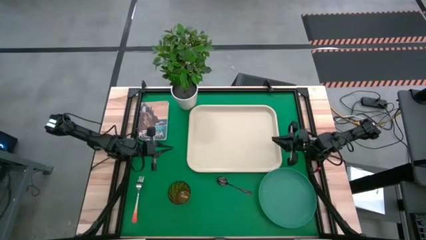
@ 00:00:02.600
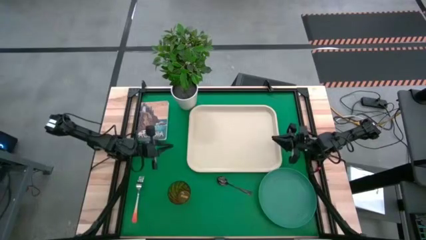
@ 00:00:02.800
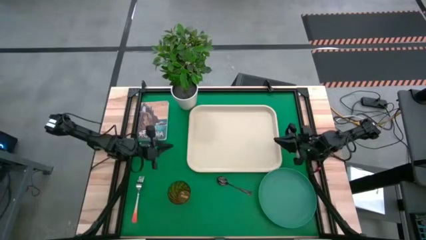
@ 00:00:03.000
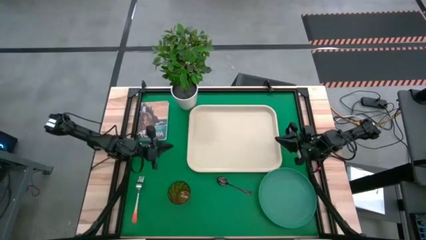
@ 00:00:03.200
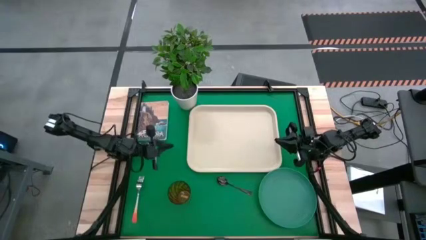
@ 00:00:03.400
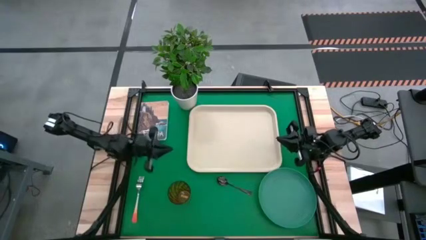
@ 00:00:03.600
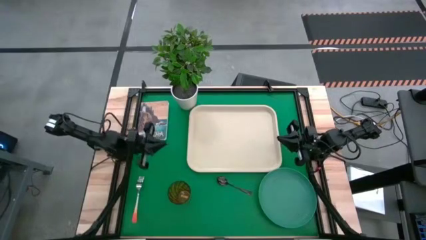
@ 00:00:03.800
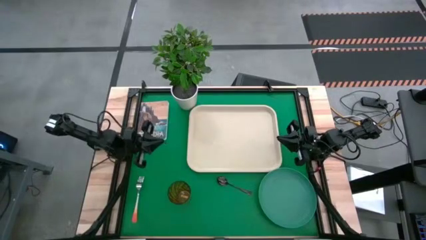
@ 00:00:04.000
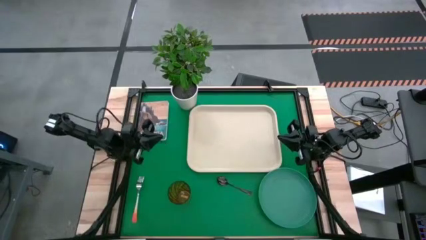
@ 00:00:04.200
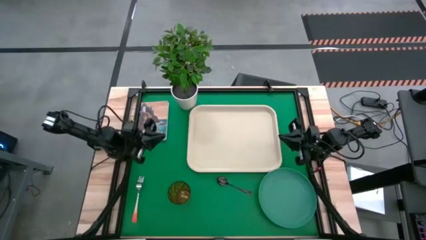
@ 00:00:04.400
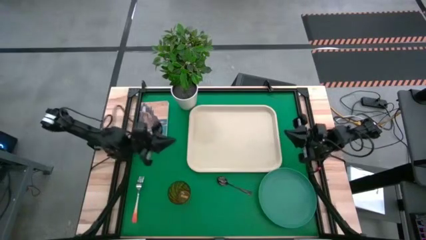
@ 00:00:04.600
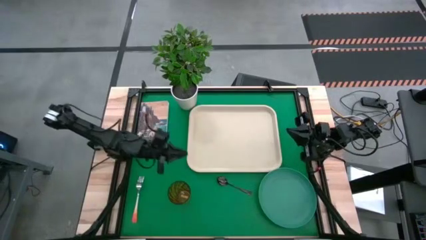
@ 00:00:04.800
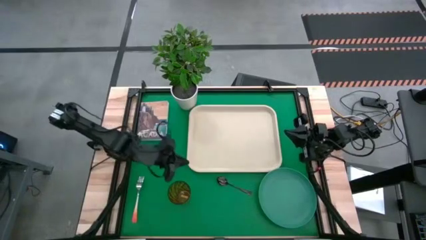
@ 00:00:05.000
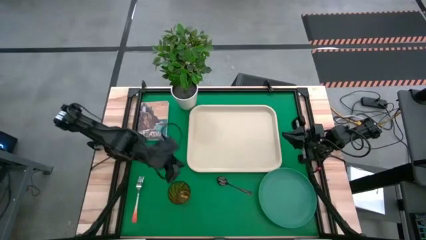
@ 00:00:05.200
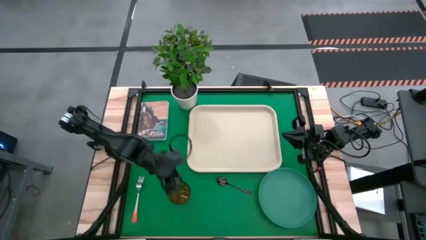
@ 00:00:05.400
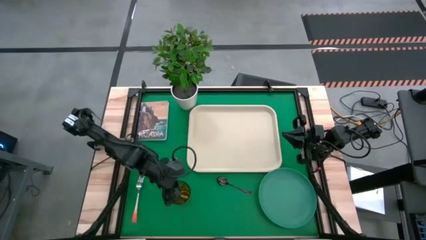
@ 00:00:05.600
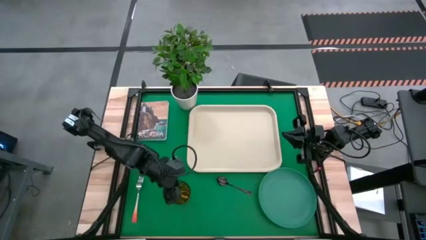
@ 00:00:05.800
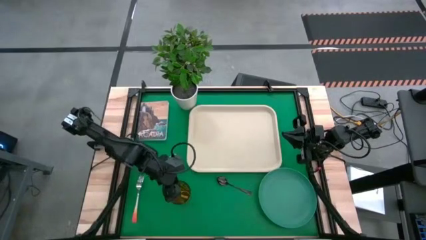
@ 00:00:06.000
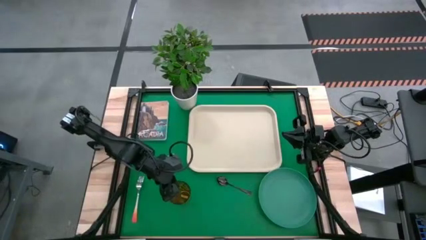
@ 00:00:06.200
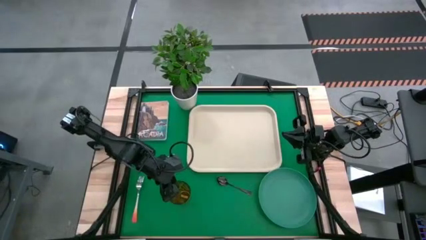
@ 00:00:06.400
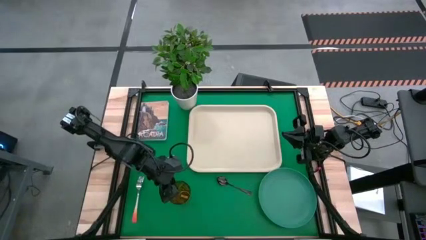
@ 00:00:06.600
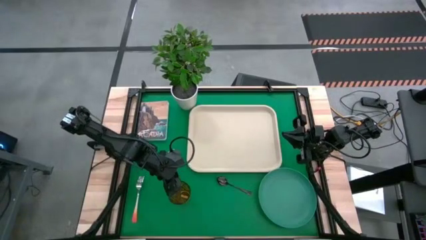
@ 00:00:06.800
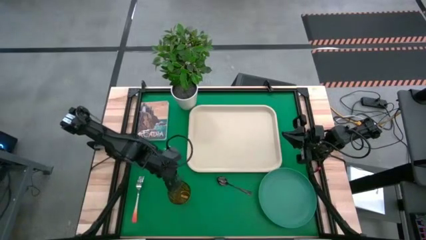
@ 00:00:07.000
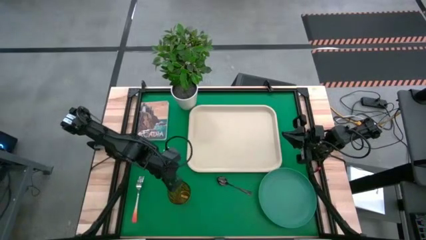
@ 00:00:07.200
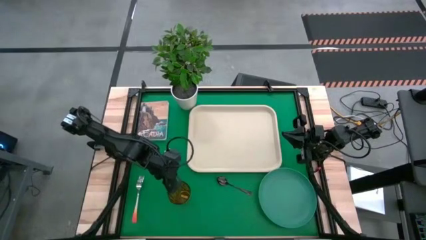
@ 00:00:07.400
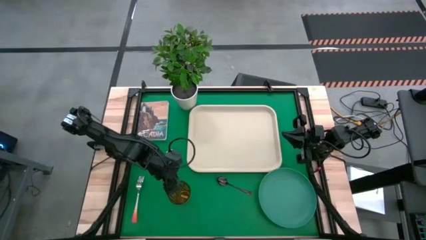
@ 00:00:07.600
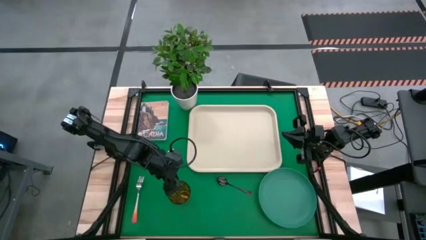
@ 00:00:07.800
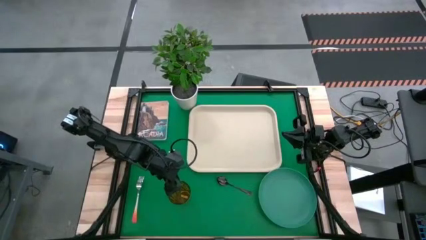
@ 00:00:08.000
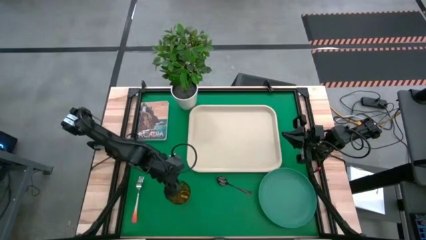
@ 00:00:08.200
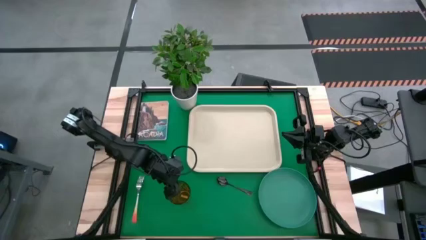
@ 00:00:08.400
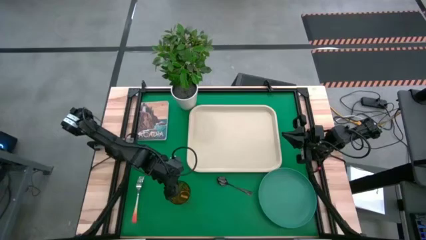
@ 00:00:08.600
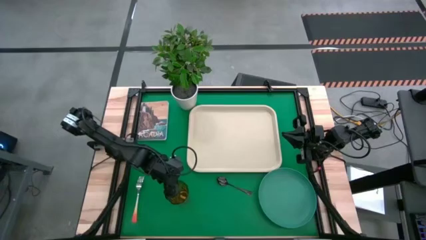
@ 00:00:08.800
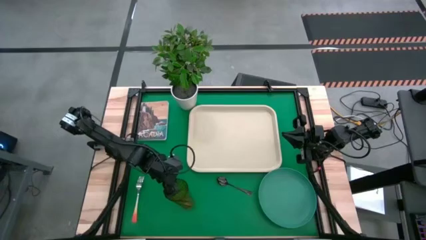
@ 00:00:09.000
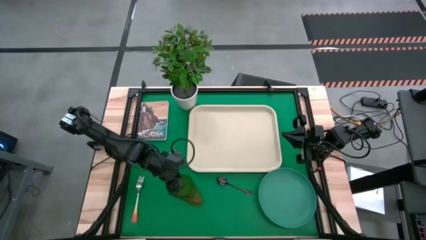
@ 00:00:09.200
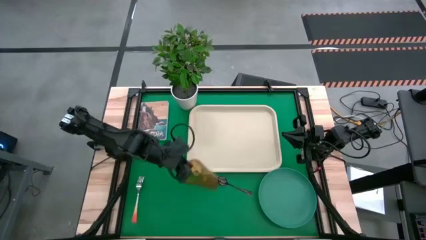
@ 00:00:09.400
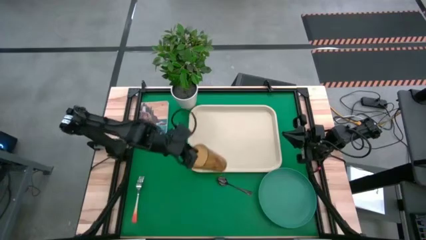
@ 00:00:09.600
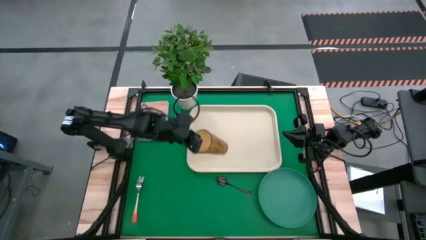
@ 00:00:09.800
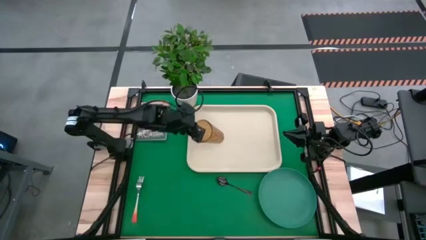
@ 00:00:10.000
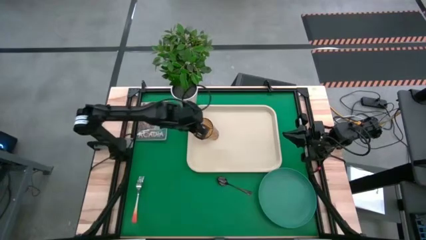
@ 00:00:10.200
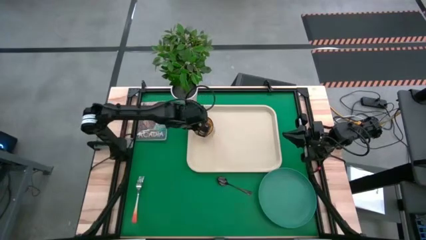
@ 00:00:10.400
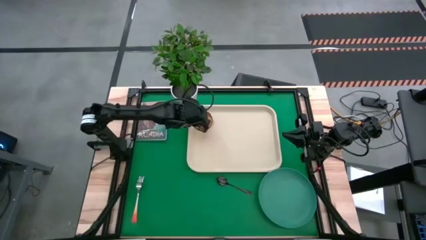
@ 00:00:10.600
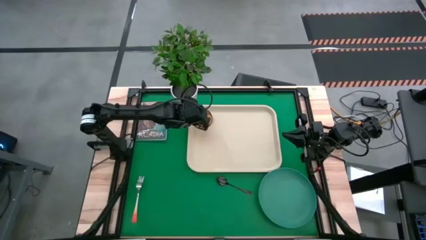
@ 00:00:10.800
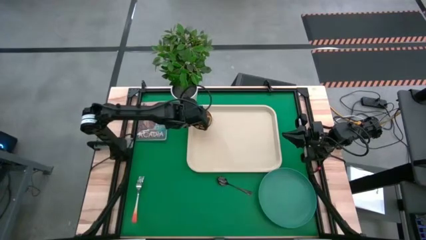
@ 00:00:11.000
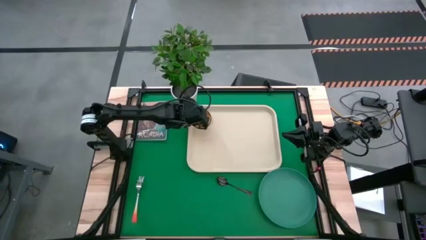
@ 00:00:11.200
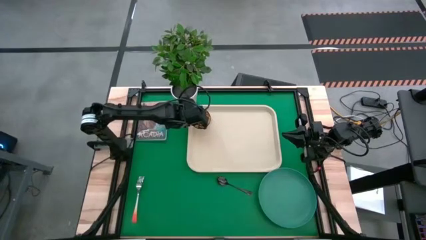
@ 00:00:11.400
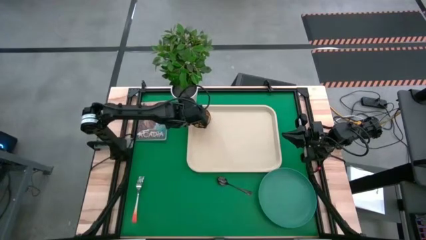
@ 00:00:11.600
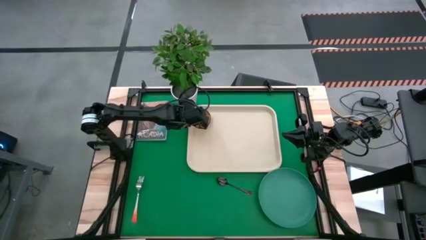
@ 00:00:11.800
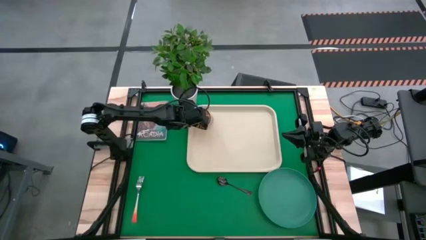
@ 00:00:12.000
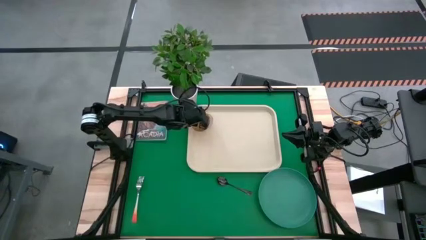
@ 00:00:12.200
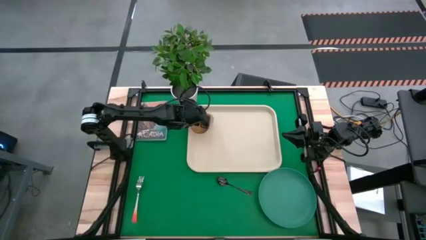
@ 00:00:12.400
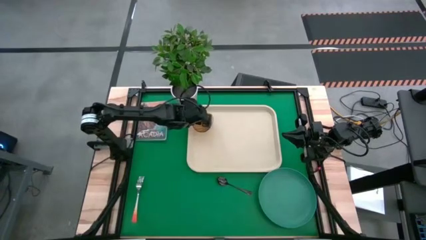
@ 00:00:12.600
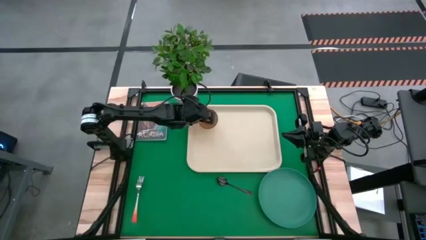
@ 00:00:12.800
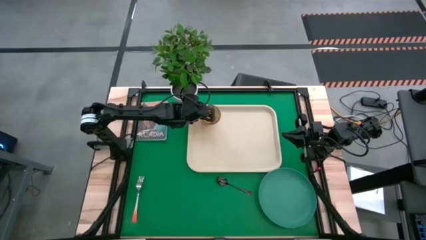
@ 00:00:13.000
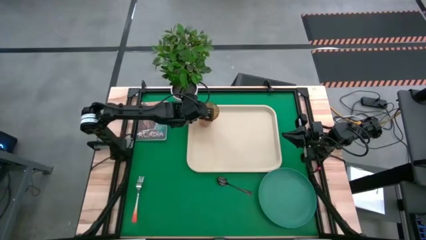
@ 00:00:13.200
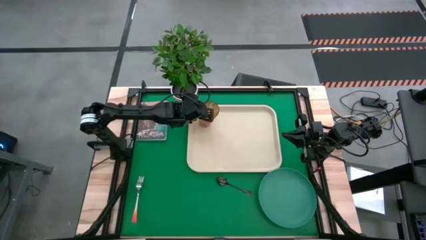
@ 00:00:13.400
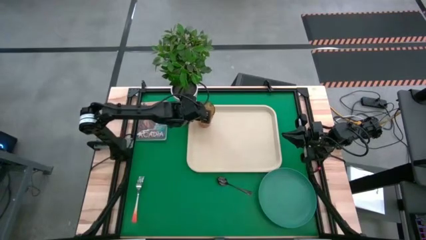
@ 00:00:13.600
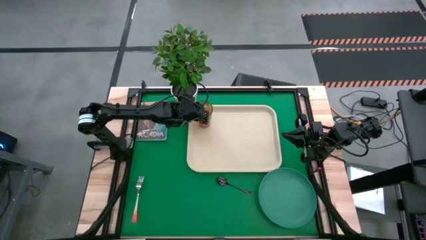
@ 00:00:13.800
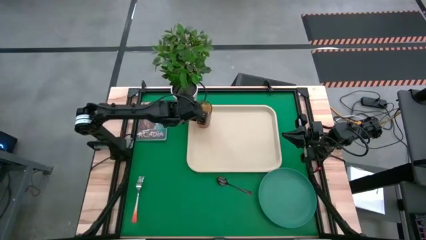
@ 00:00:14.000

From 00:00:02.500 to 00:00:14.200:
Task: Pick and place plate/cup/fork/spoon on tray
Put the brown glass on the white serving tray

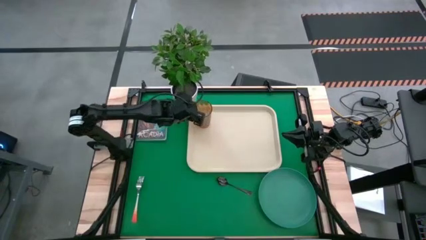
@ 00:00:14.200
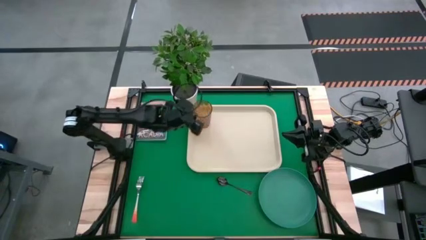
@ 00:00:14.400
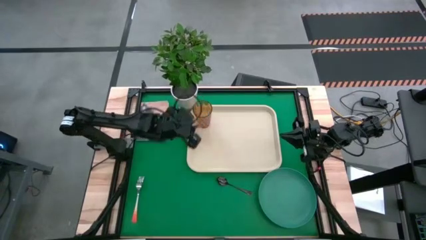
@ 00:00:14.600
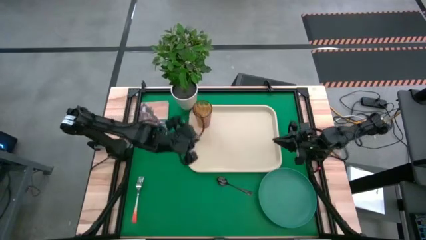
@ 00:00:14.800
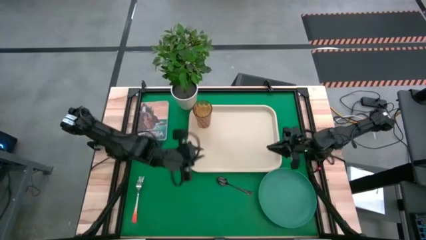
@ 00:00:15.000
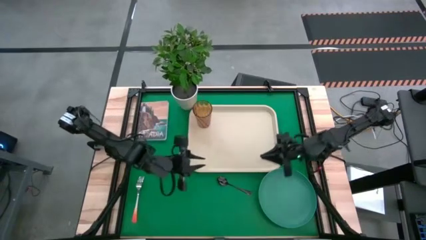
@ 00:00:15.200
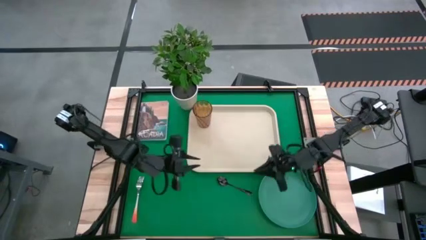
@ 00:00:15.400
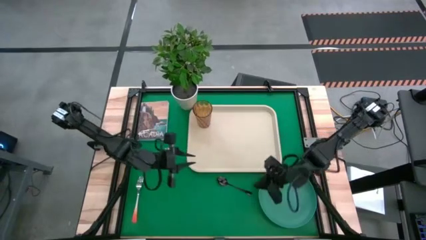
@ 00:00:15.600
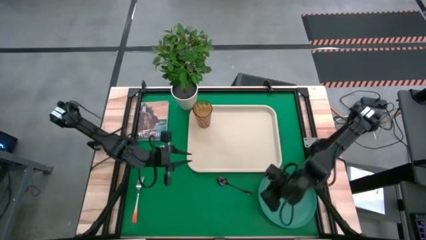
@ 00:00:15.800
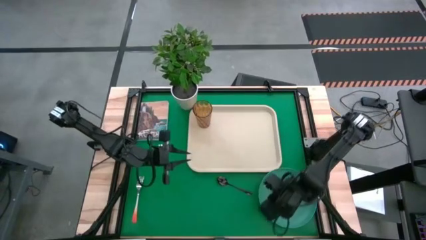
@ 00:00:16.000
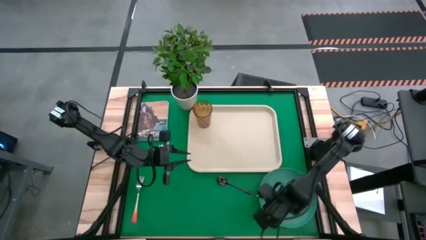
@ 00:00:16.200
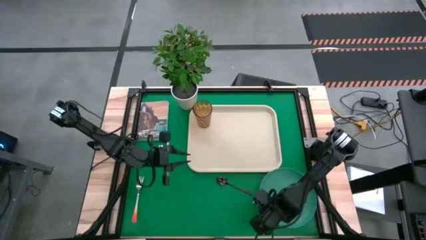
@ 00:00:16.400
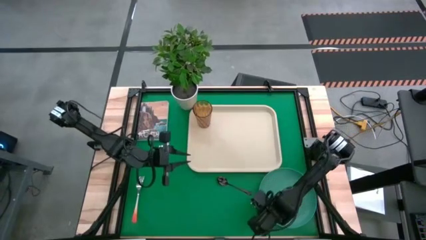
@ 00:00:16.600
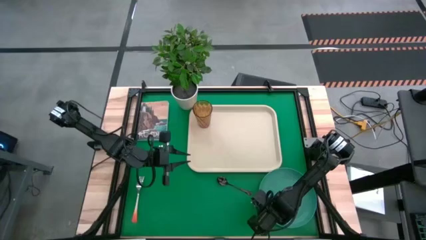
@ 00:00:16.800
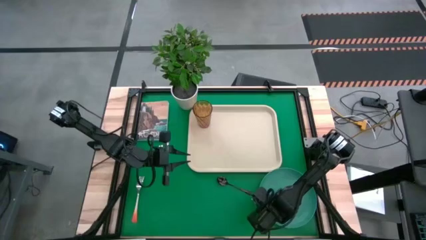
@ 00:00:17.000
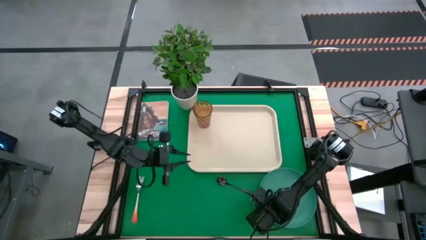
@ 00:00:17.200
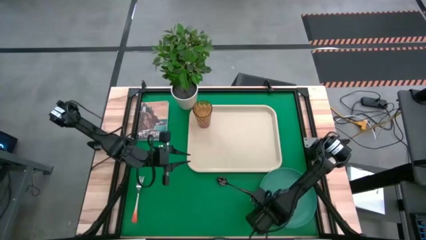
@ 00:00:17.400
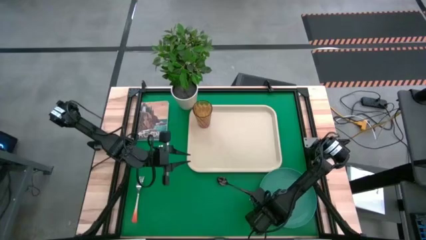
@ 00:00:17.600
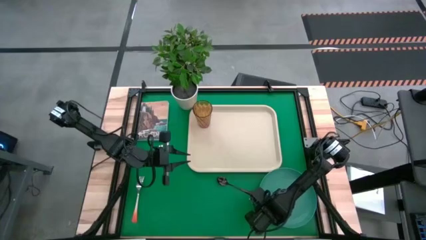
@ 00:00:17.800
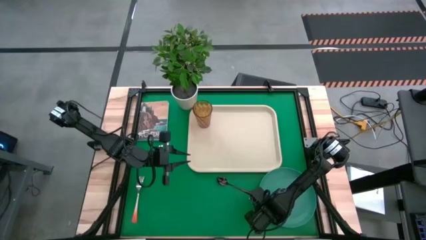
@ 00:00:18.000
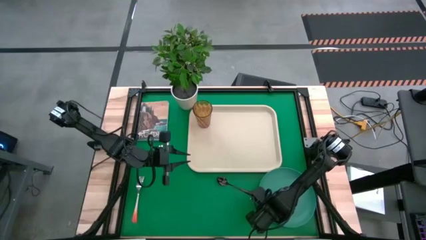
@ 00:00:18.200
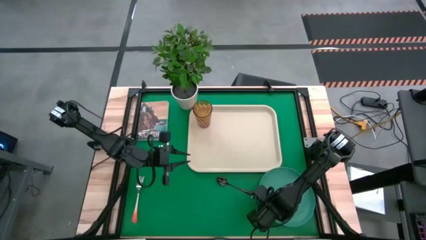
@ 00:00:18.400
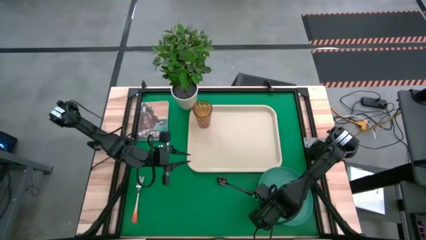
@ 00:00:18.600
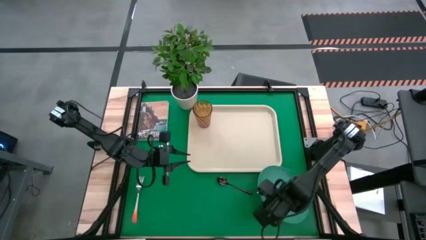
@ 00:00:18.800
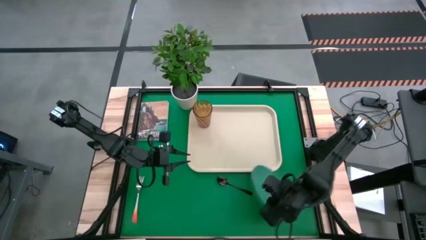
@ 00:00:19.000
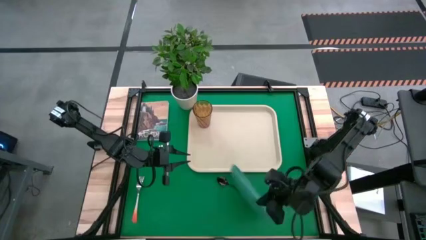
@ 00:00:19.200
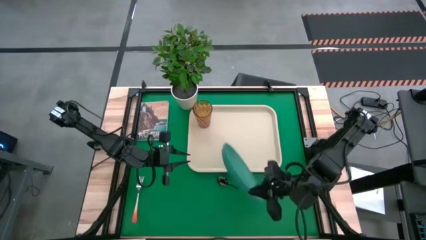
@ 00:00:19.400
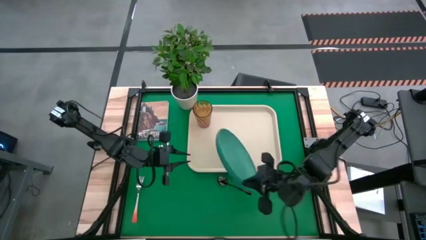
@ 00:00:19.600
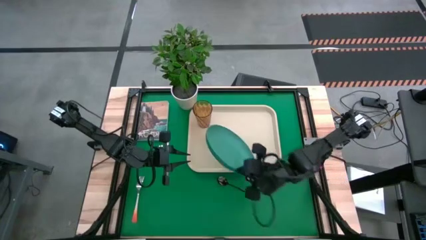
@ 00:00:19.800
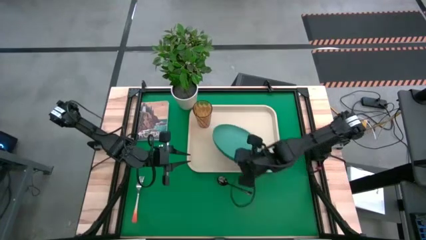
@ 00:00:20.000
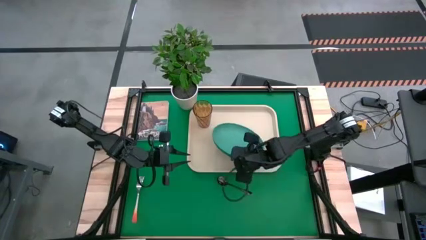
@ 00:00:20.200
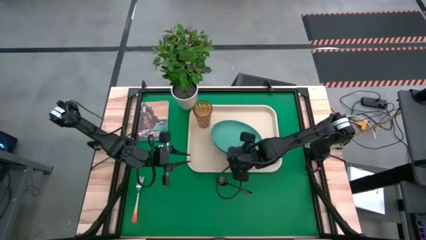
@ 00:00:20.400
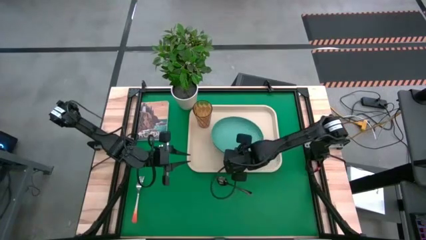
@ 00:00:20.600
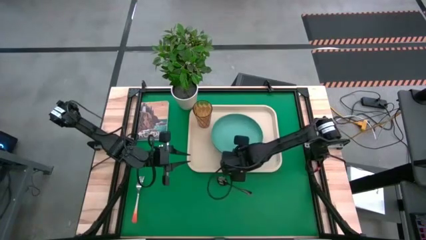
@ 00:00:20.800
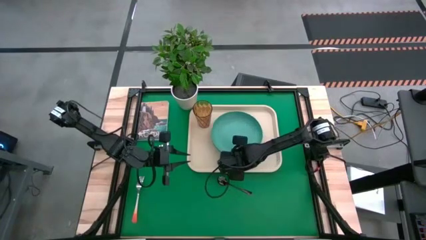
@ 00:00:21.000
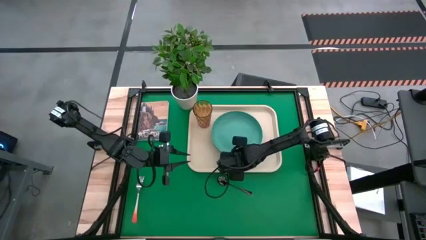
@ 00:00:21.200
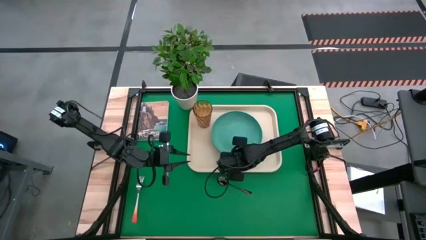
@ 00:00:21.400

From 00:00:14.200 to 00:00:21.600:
Put the blue plate on the white serving tray
